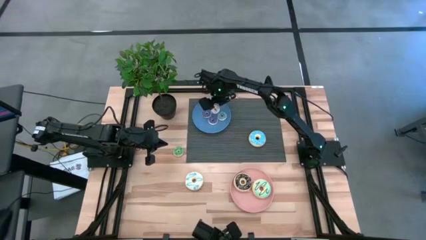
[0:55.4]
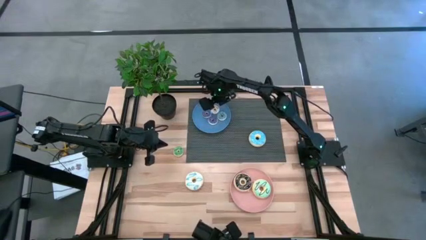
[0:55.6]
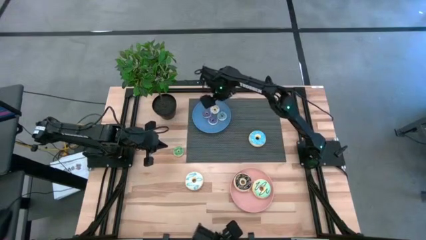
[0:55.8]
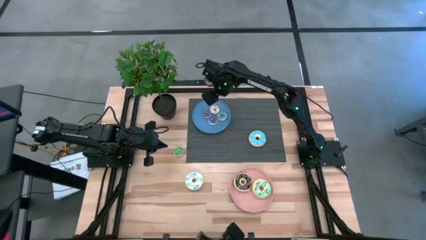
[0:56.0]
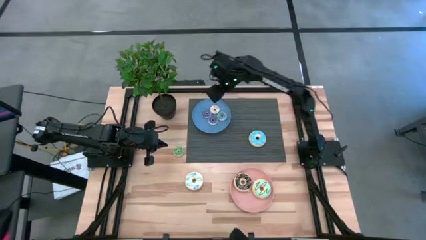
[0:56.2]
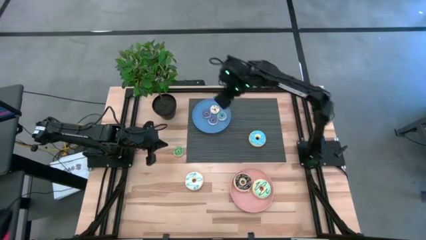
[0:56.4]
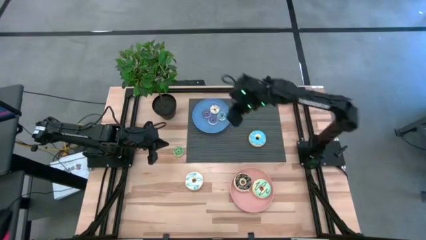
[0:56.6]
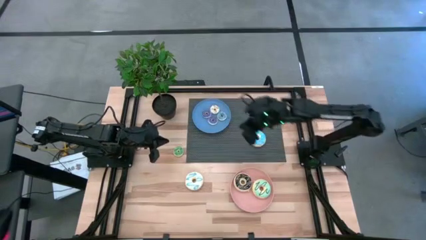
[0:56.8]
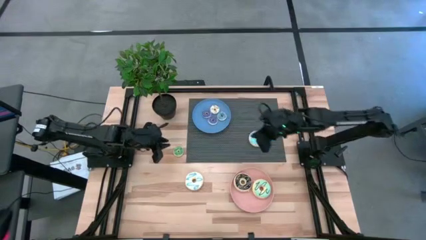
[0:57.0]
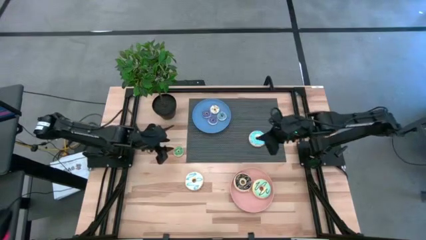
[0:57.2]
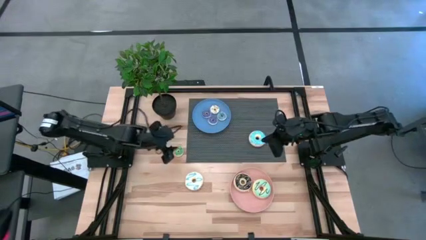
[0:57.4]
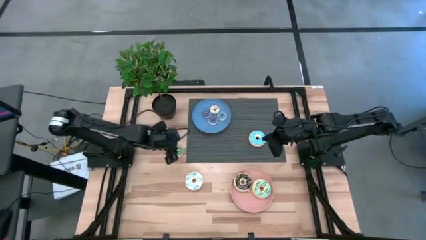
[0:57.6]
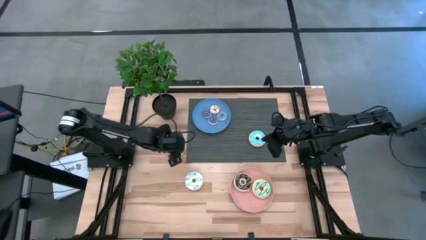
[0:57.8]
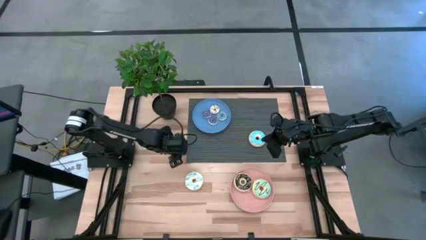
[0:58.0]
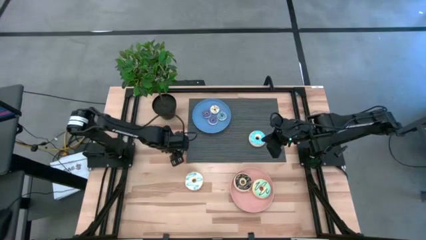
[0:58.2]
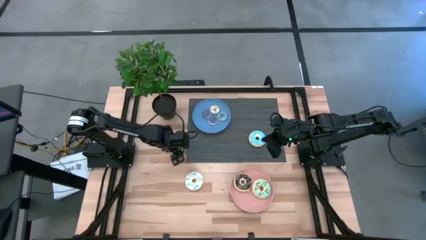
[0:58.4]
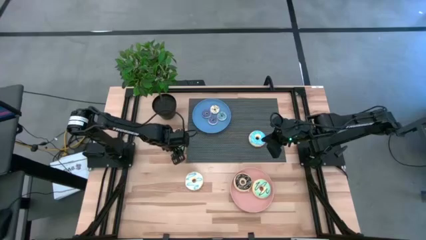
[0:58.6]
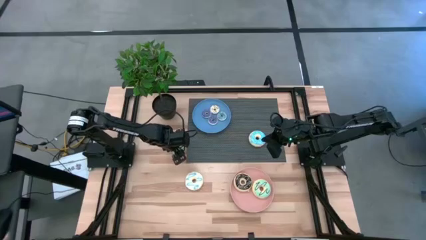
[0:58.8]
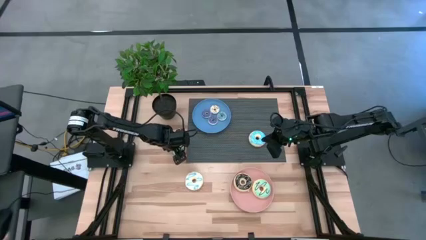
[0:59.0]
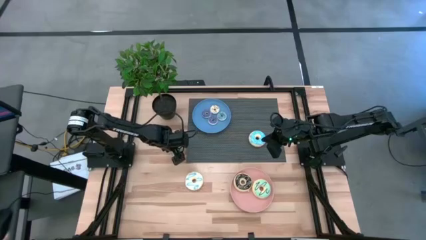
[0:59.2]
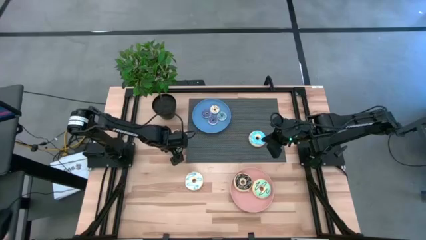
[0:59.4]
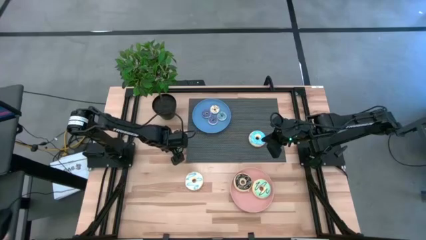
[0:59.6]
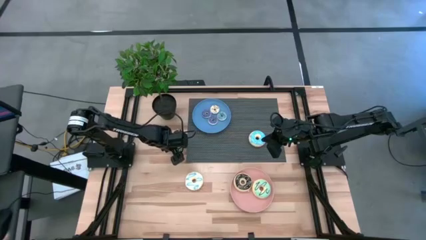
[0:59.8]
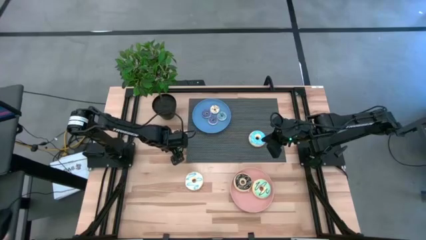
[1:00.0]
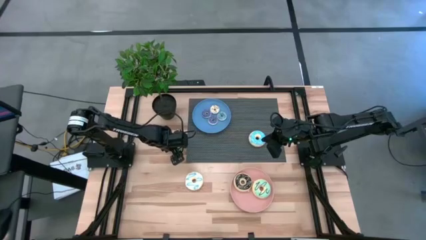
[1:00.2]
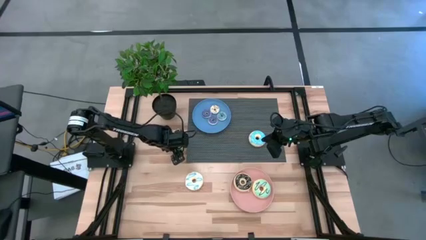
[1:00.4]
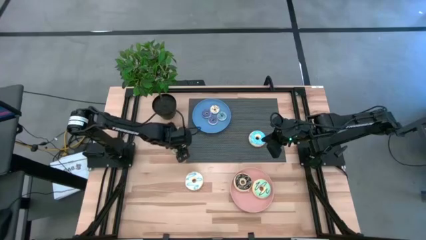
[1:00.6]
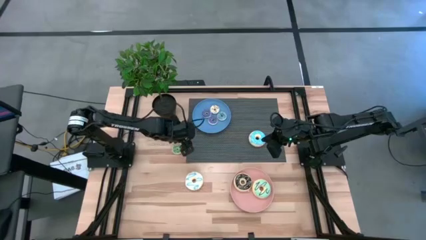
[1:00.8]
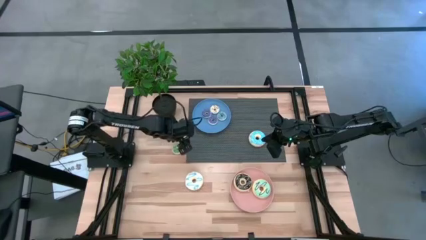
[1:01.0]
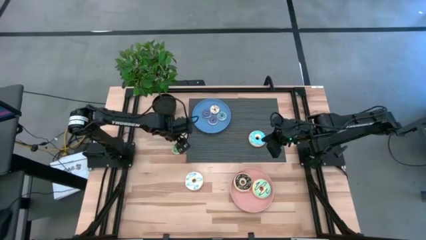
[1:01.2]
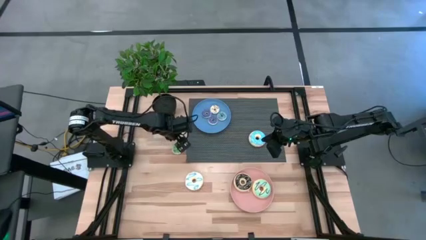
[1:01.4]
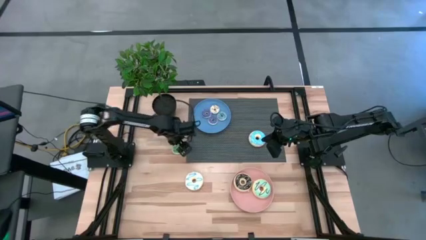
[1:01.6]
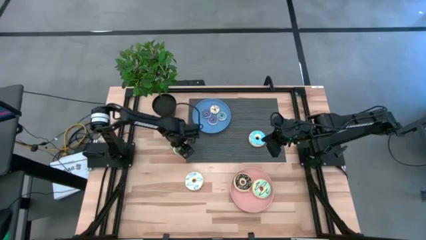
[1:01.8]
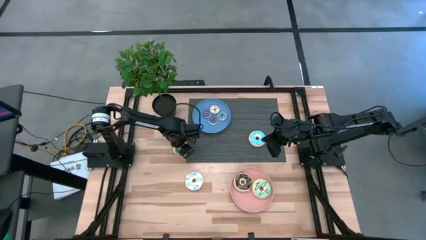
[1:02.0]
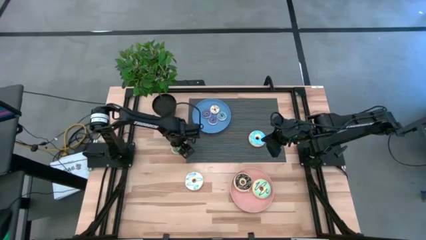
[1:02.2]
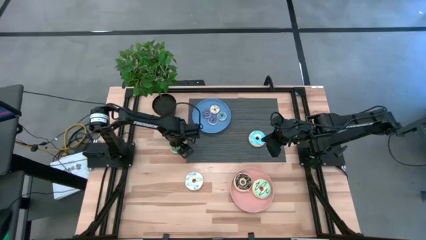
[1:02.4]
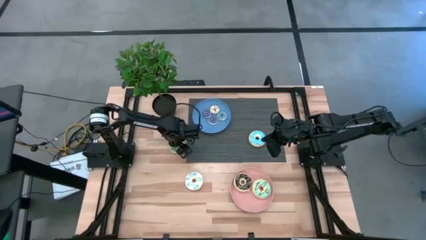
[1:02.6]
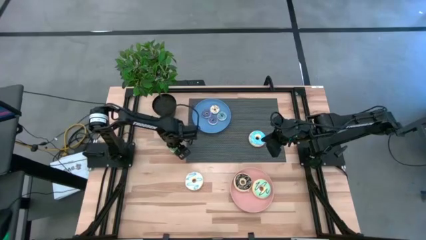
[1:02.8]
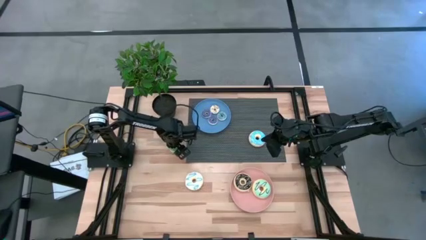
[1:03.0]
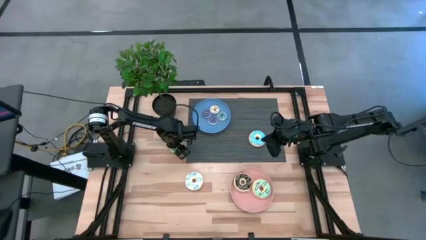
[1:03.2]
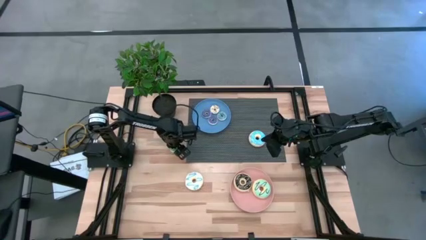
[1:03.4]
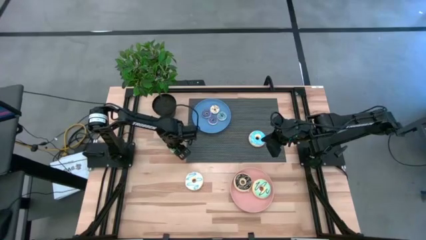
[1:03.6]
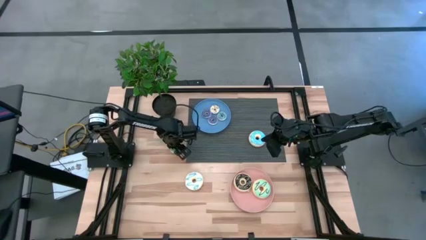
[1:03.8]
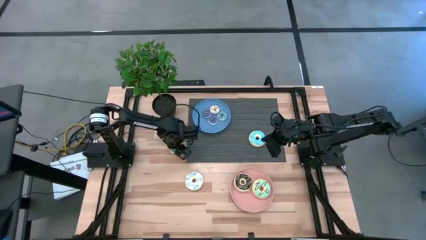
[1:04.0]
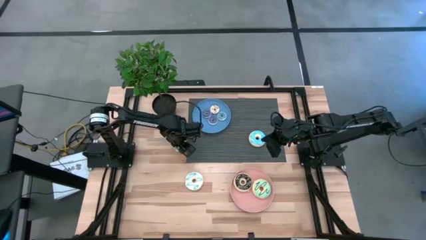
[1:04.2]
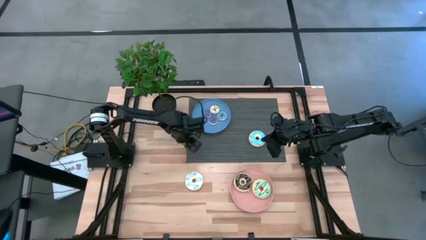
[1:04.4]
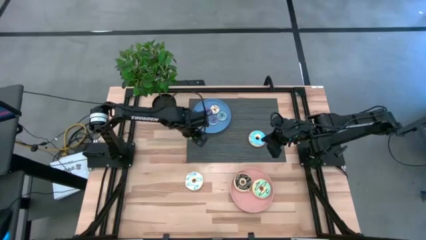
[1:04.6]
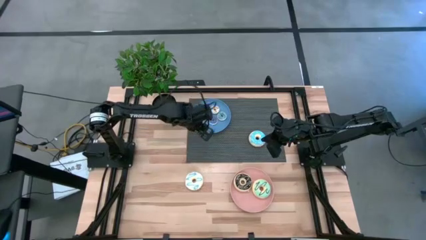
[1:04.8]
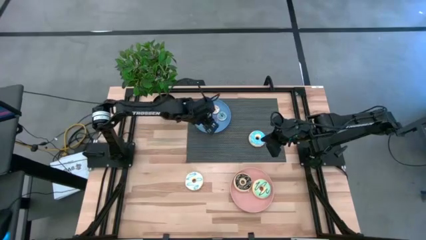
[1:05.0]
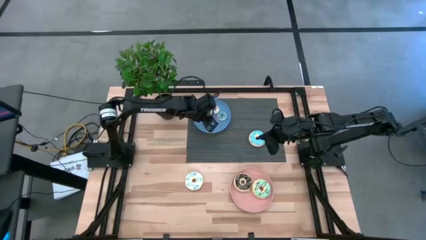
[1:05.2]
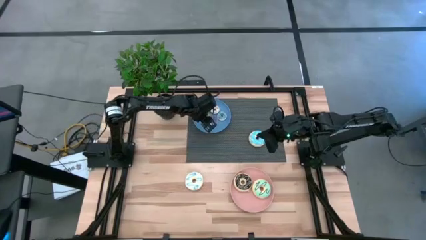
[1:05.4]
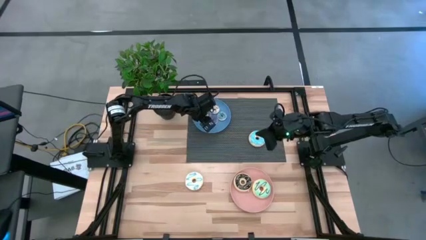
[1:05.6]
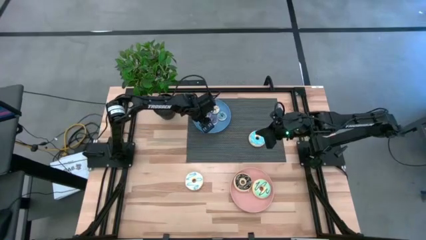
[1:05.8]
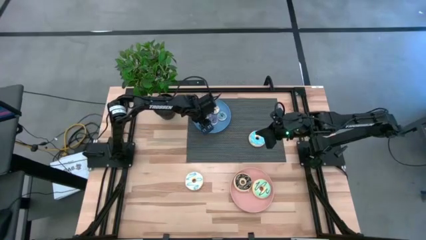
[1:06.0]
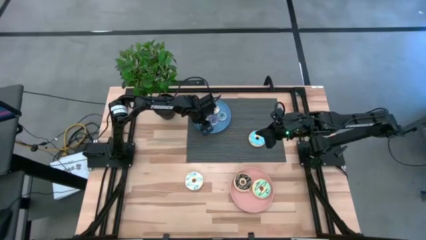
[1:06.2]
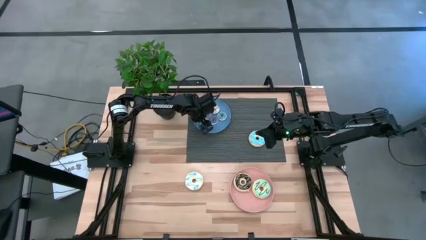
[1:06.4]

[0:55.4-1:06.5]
Task: Pick & Place donuts
Put the small green donut into the blue plate

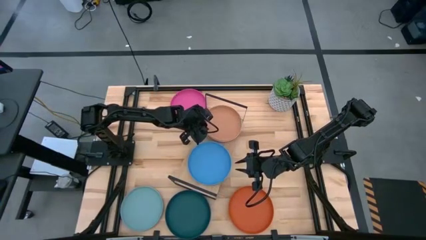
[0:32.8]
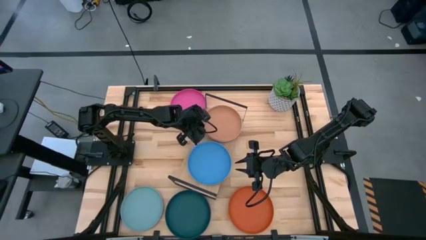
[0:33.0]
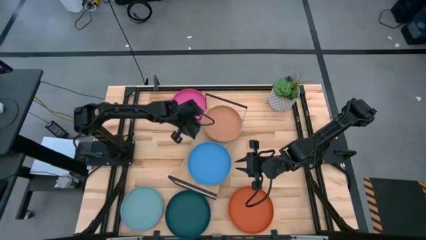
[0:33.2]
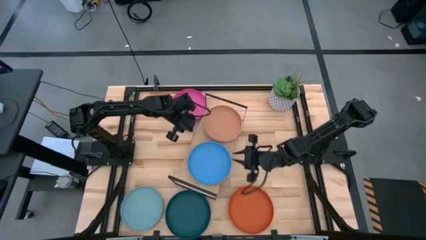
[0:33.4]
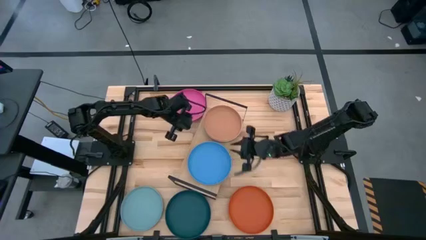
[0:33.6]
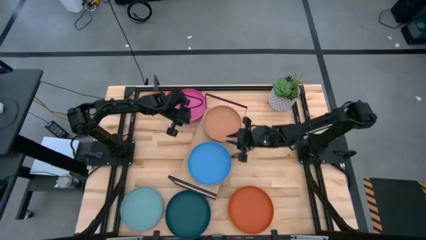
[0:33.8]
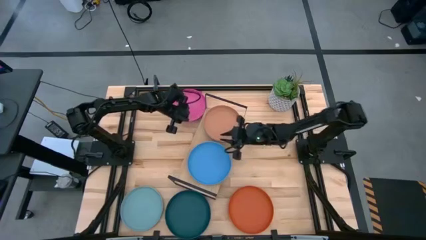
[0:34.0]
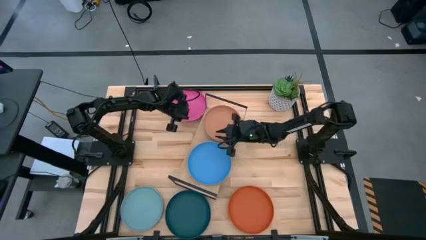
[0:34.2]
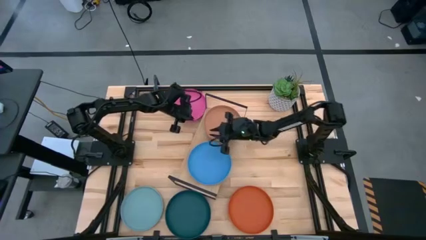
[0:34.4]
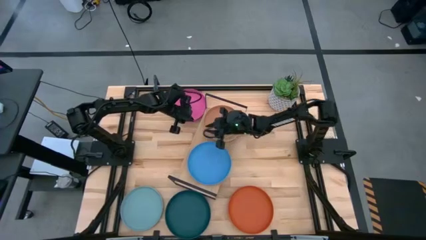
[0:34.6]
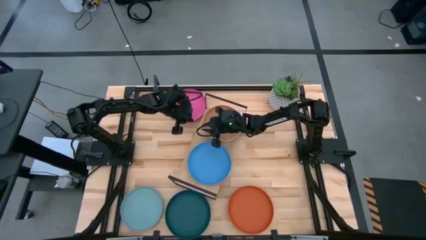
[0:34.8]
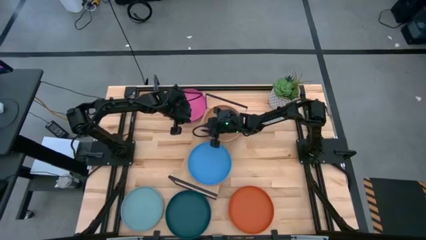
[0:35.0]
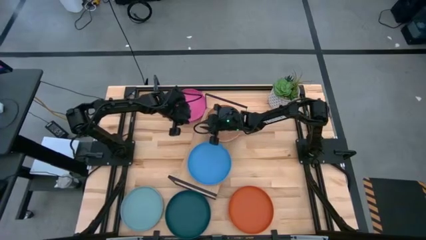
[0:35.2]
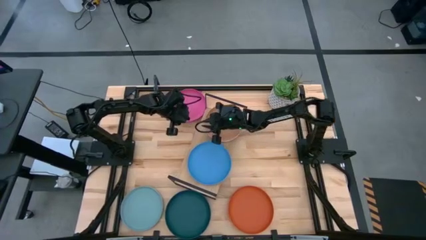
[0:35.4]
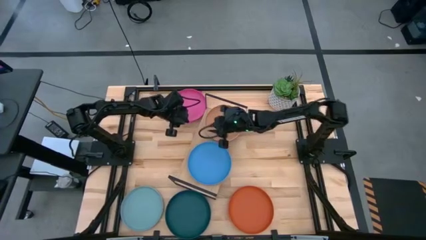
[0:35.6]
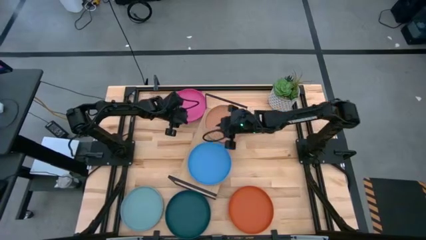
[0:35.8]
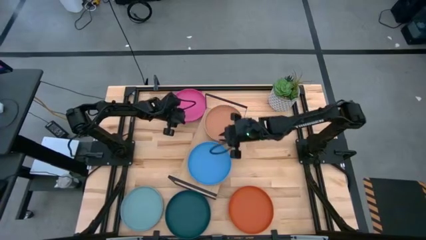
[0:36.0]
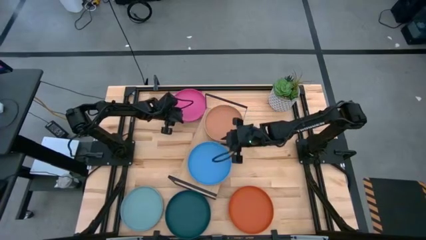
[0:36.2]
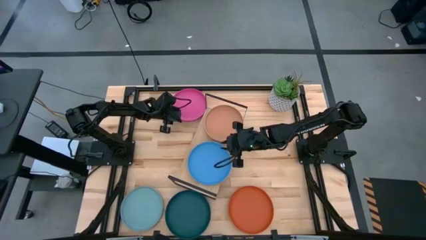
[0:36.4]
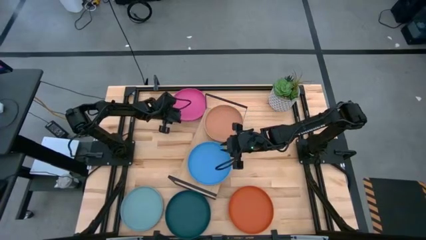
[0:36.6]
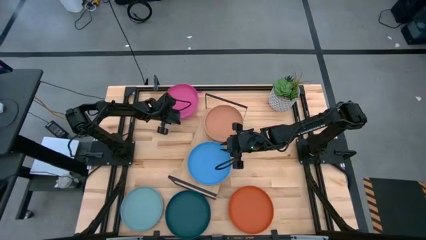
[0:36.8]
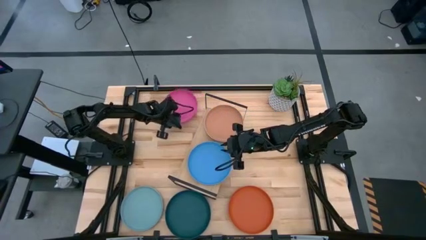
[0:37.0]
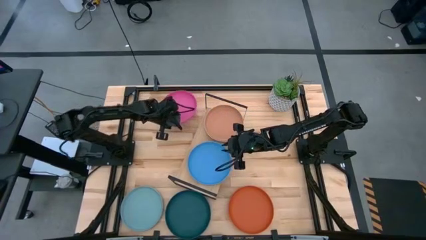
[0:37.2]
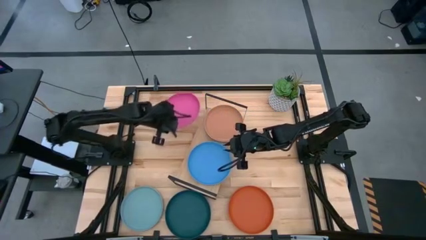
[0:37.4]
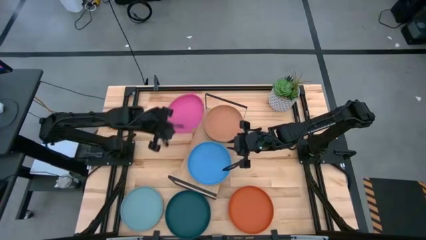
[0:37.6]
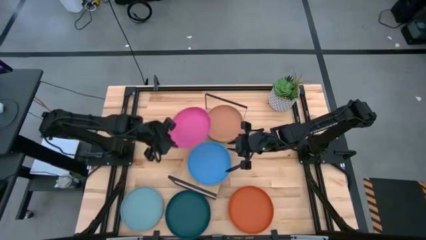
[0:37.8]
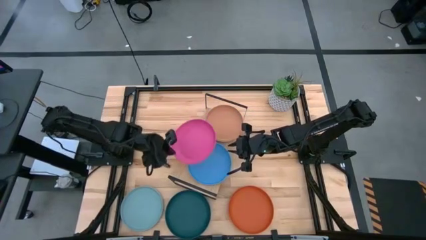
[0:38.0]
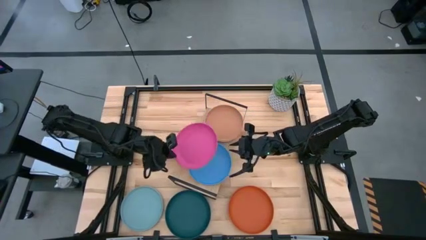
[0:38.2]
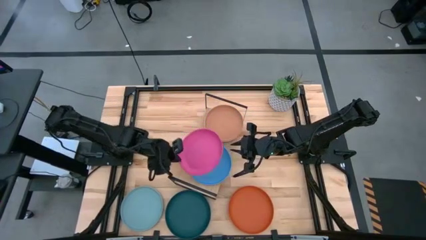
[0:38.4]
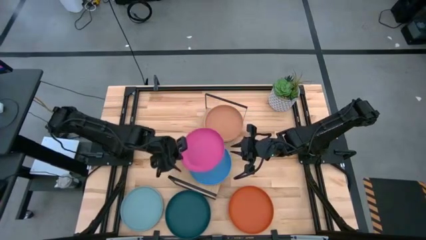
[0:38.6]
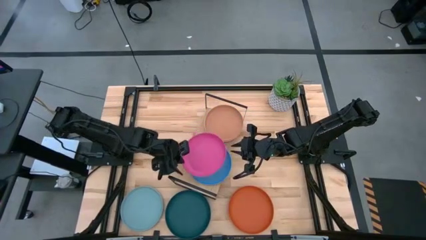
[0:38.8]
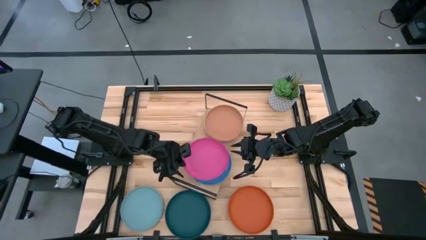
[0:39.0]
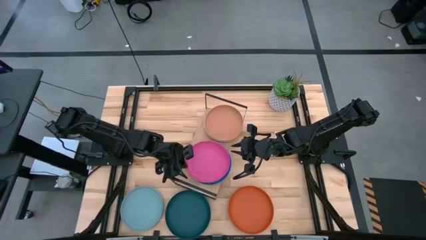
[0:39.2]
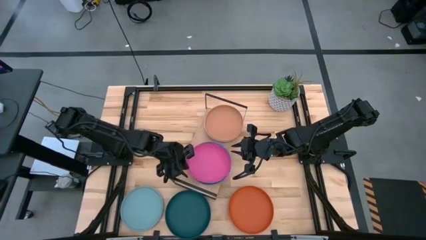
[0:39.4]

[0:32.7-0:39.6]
Task: Place and stack plates onto a shelf
Stack the pink plate on top of the blue plate on the shelf
